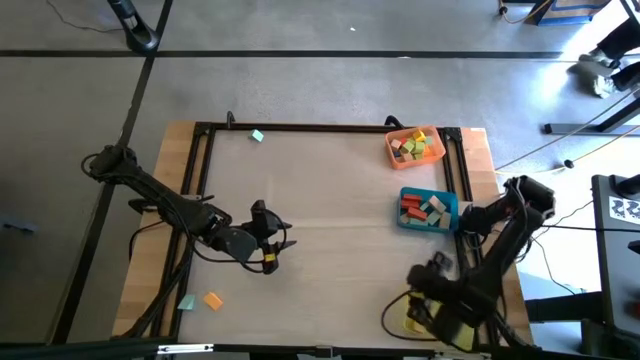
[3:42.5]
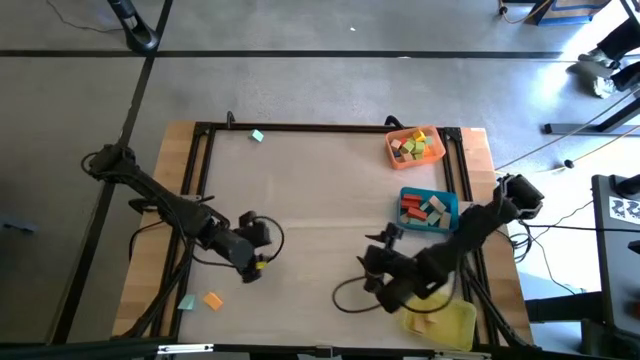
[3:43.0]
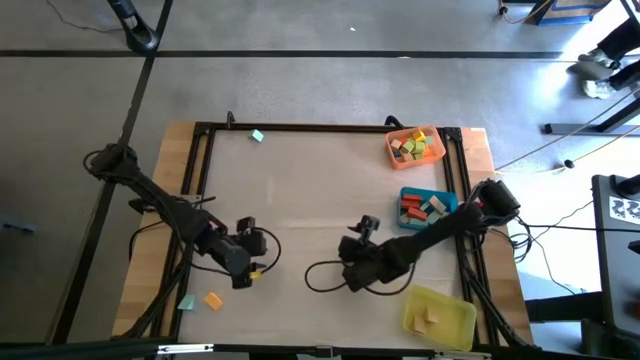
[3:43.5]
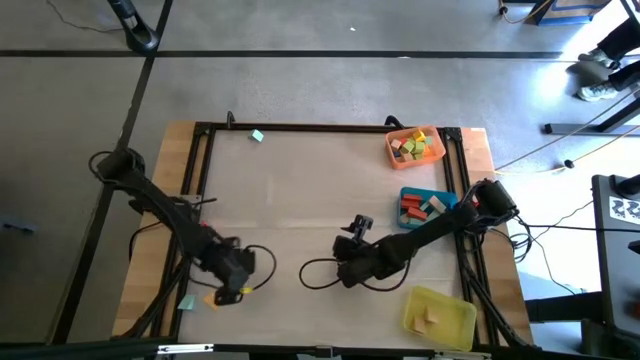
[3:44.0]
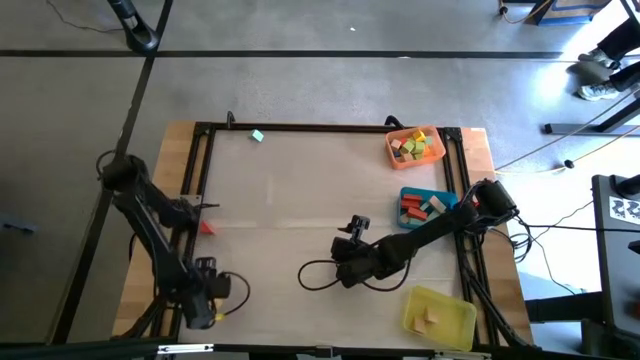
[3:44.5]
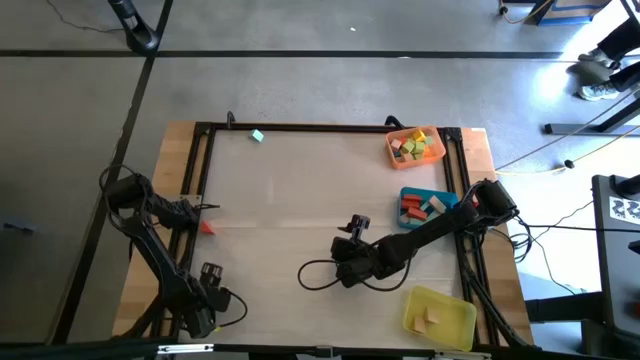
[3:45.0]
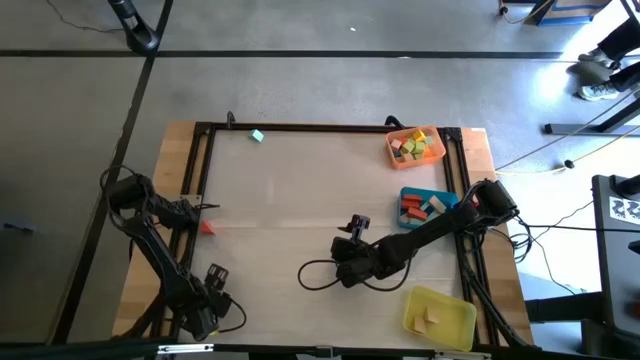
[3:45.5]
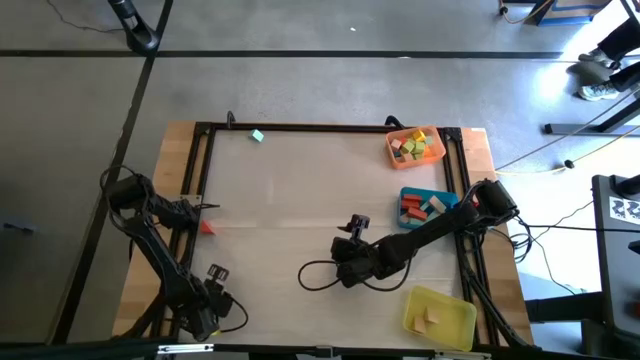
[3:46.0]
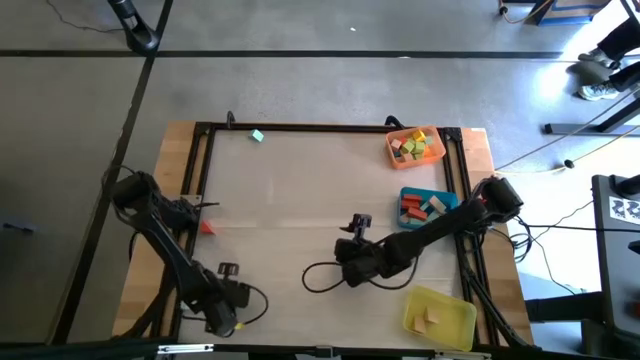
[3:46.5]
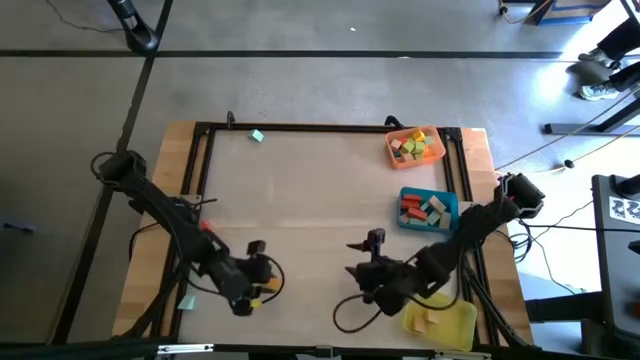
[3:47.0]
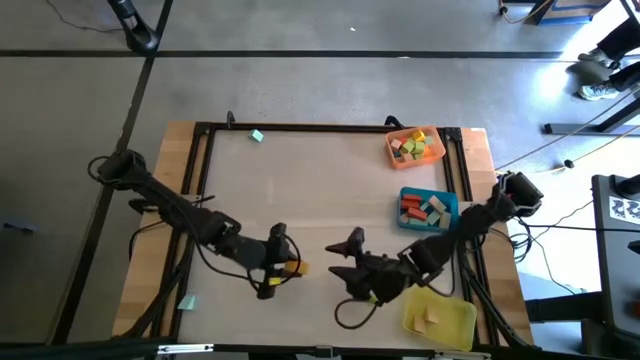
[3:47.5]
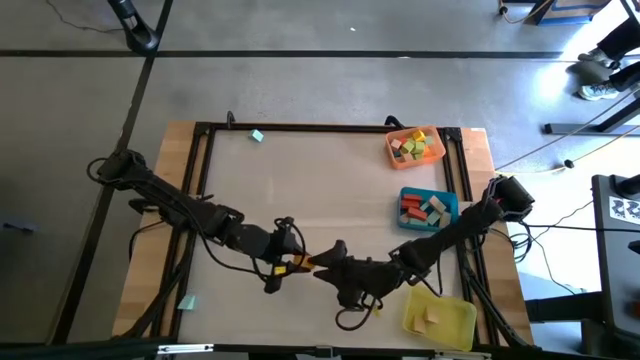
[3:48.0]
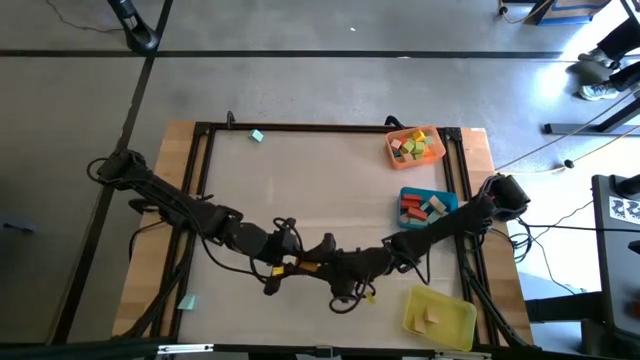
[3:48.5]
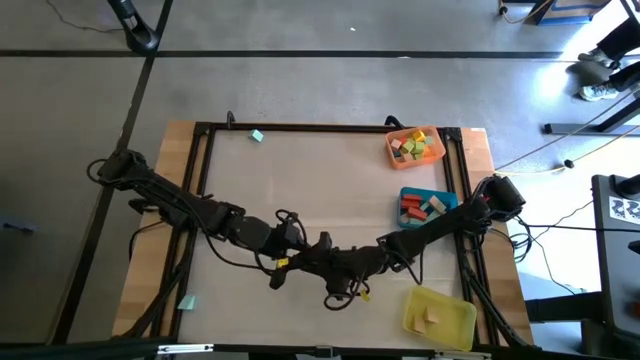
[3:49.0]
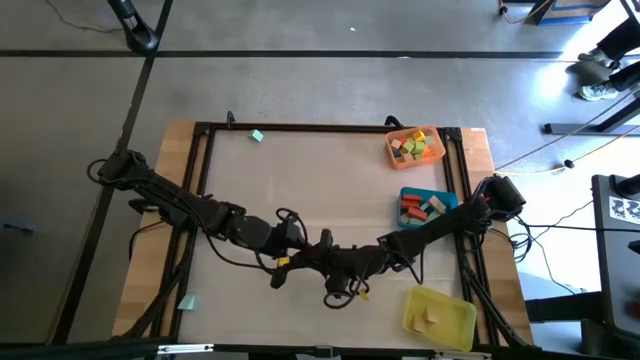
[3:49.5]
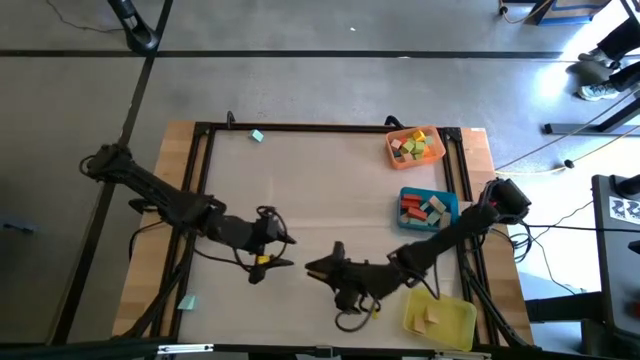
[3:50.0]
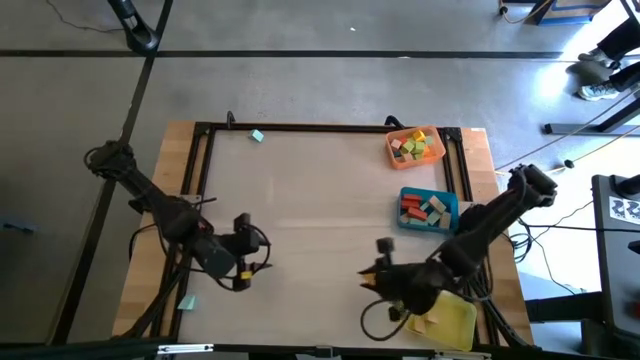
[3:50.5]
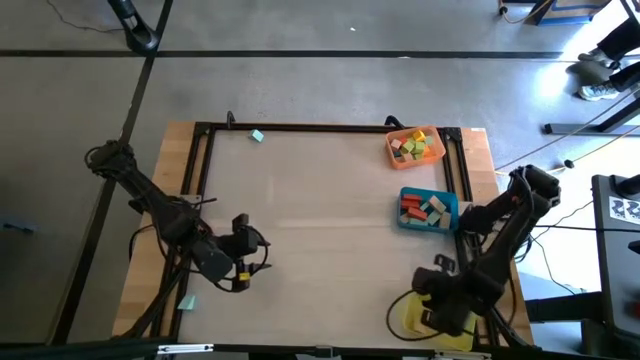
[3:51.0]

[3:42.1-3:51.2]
Task: Sort blocks by size
Put the yellow triangular block into the yellow bin

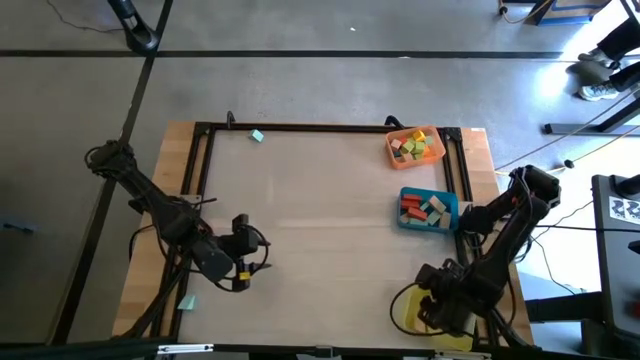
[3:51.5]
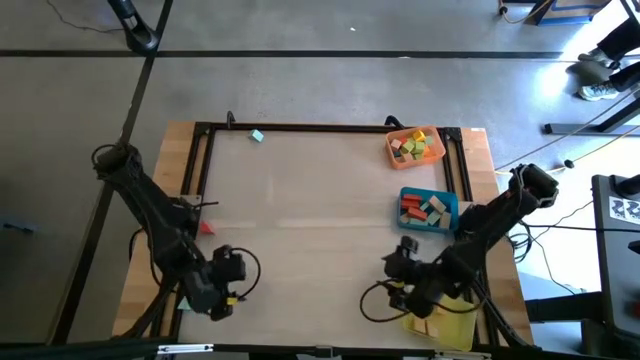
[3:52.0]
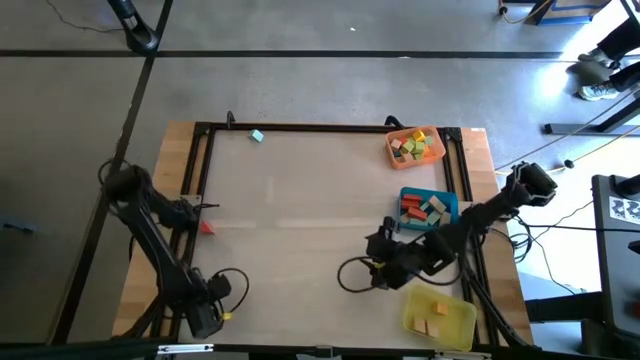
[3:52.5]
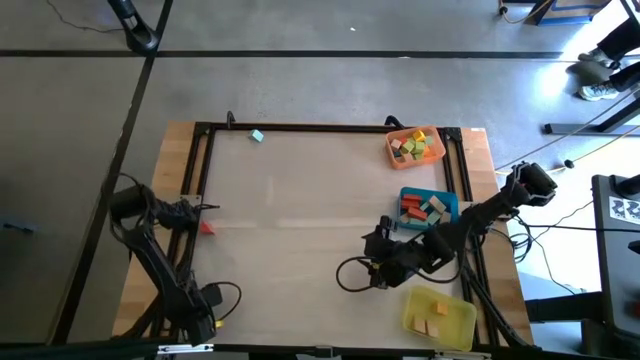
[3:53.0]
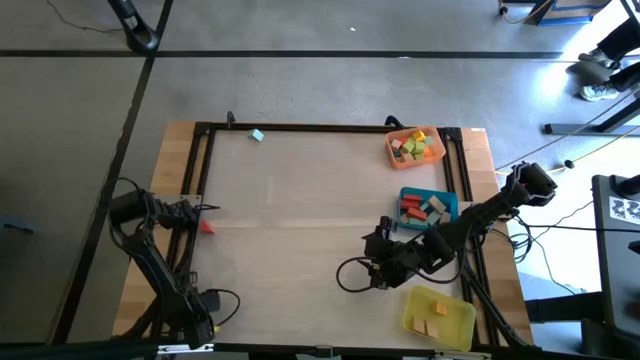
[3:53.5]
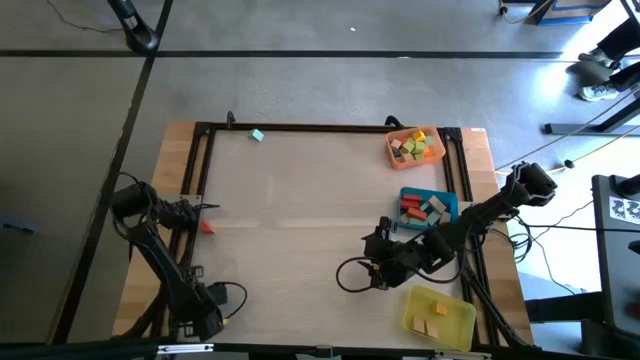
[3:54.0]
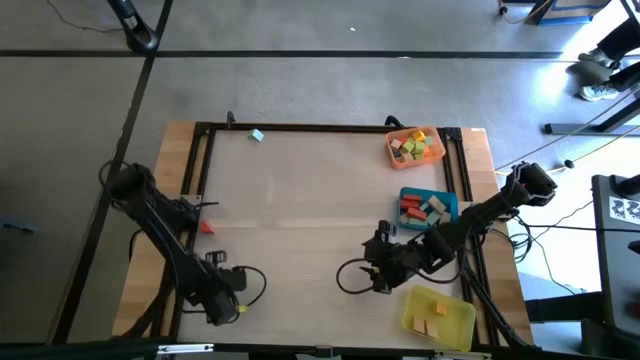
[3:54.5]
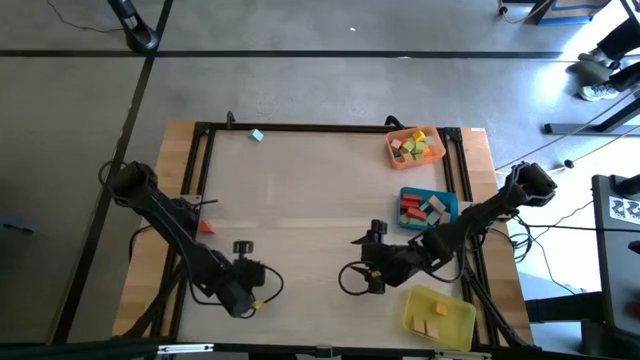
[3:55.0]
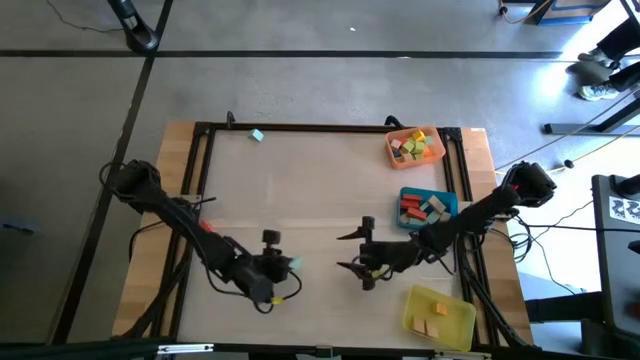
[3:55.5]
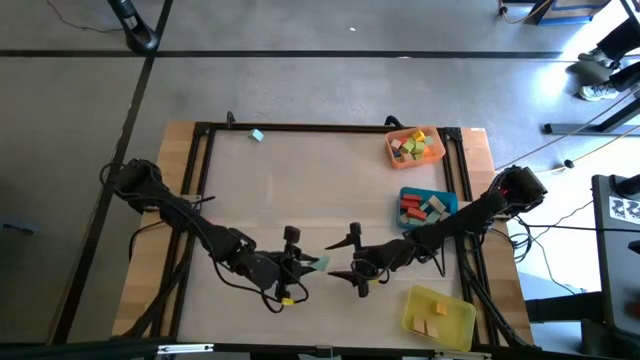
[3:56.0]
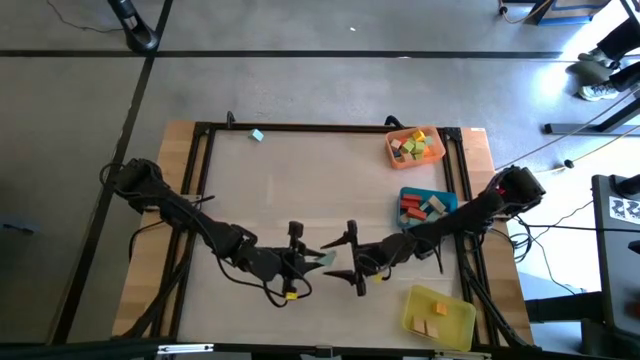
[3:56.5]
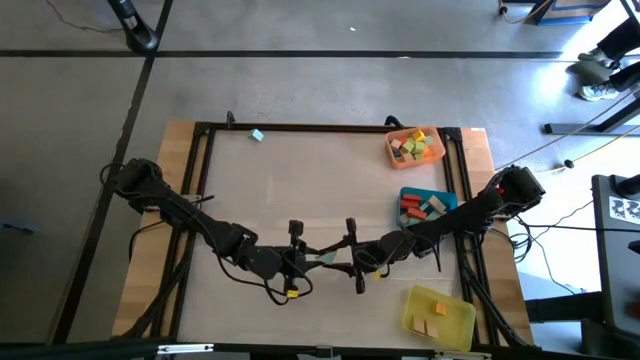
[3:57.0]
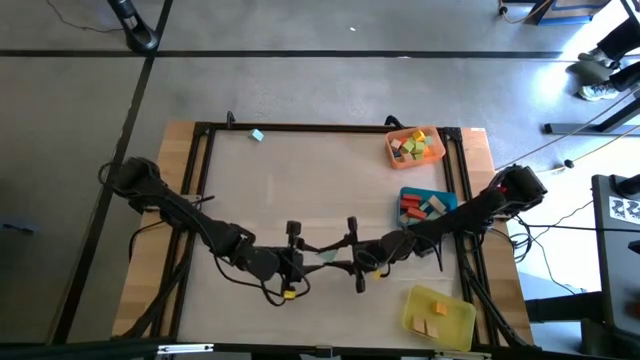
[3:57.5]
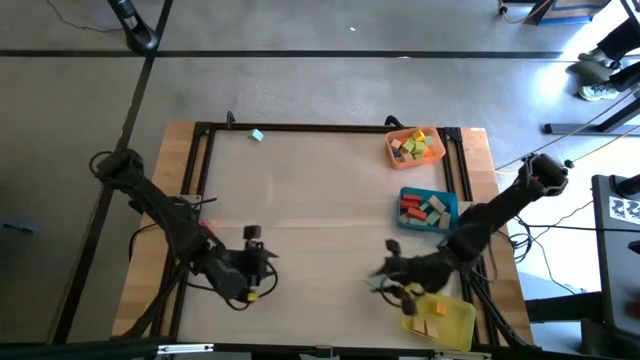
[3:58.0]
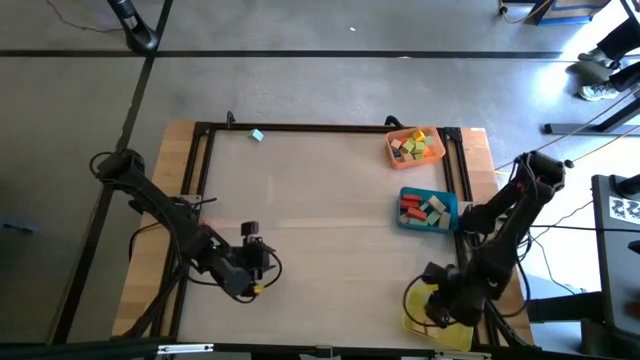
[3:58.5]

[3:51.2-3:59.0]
Put the light blue triangular block into the yellow bin

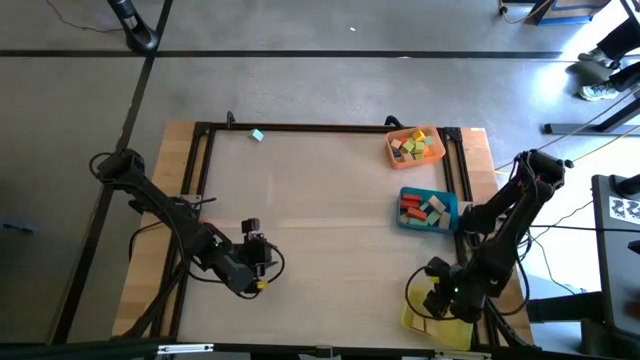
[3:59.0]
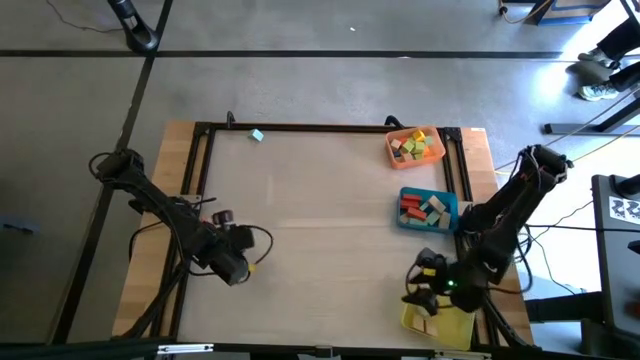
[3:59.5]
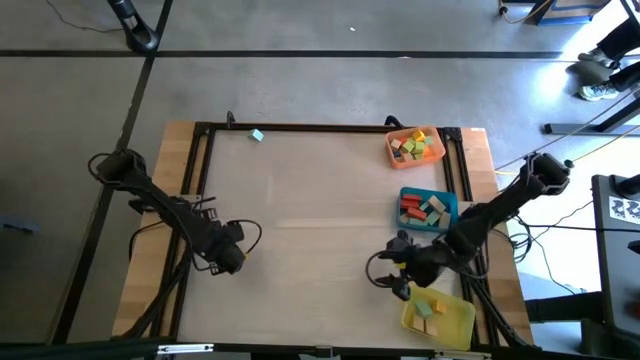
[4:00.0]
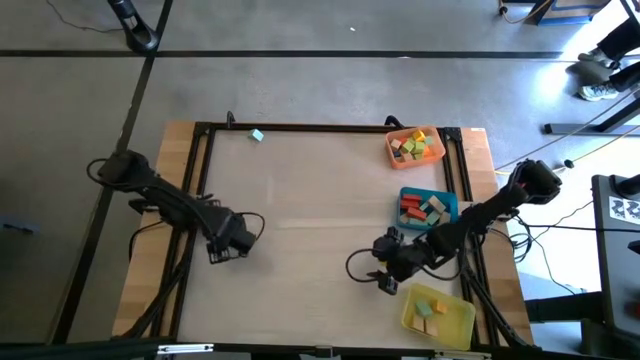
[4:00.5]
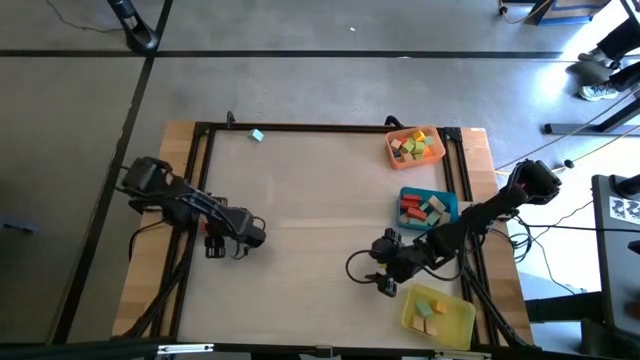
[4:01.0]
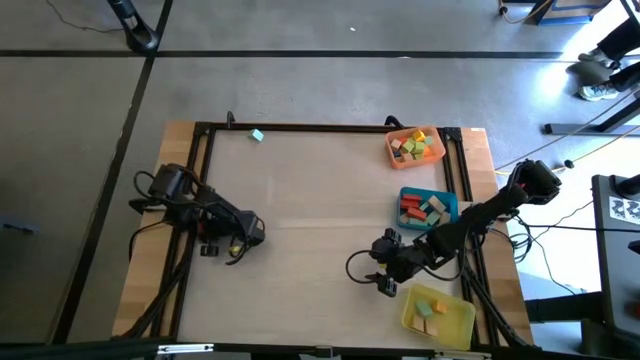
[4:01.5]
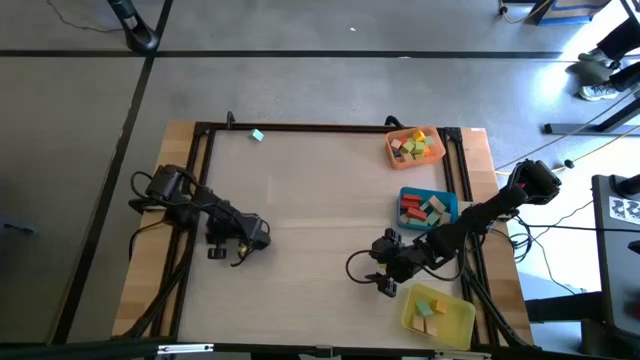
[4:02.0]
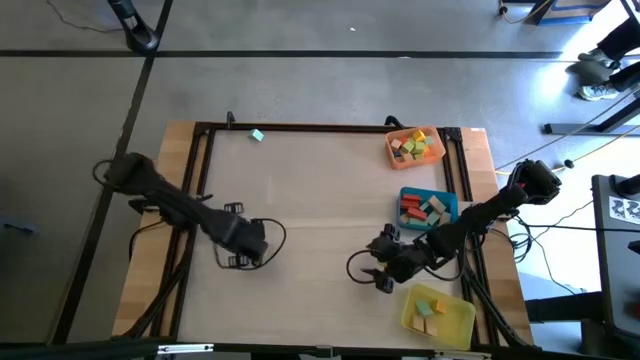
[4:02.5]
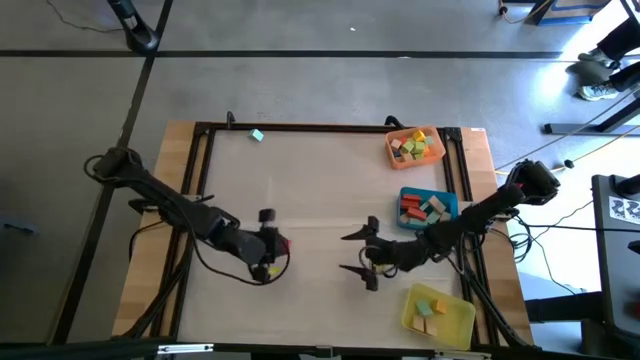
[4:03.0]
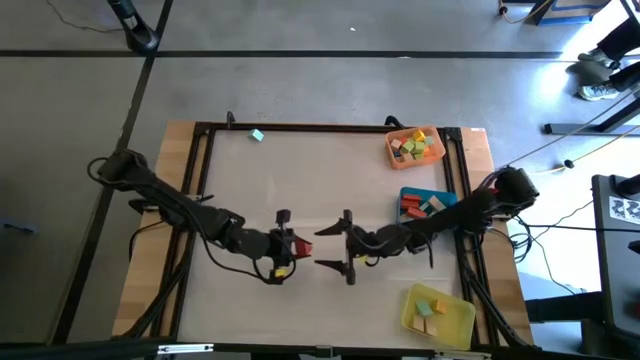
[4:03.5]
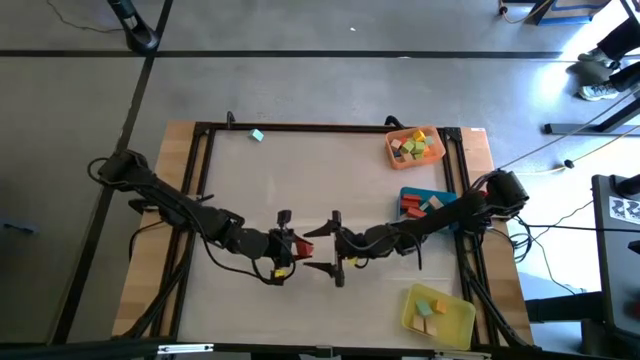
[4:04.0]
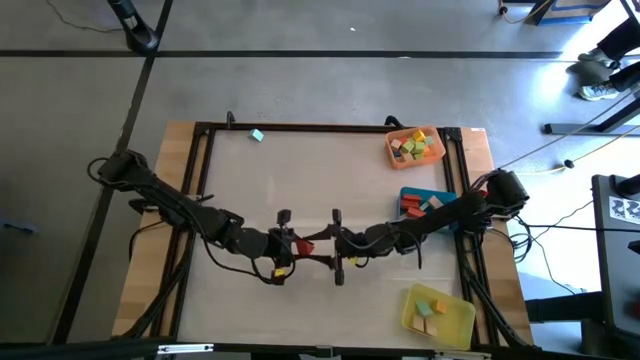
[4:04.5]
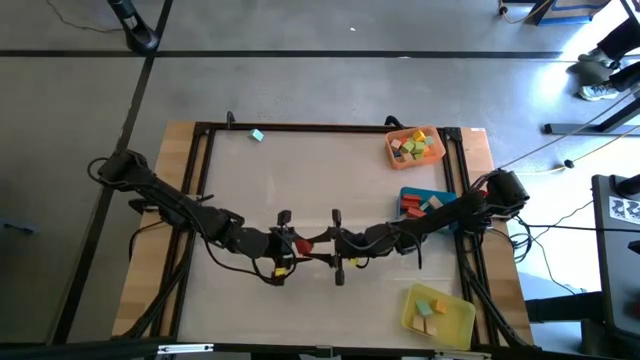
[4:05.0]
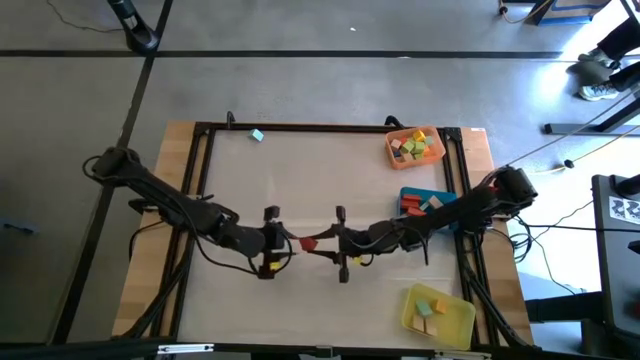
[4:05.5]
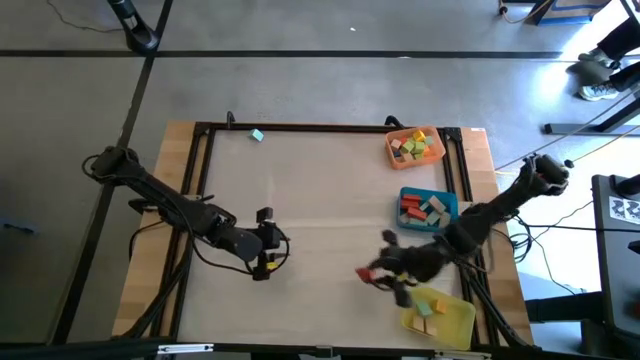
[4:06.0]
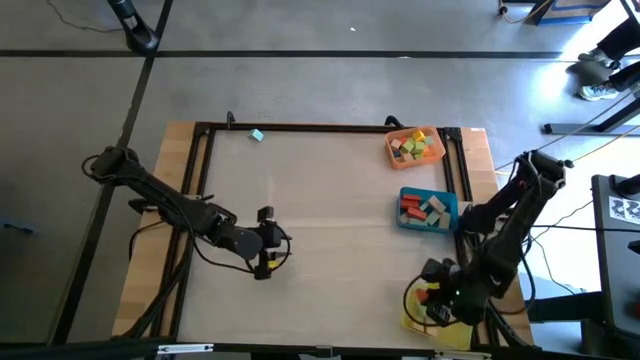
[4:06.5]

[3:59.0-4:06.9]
Put the orange triangular block into the yellow bin
